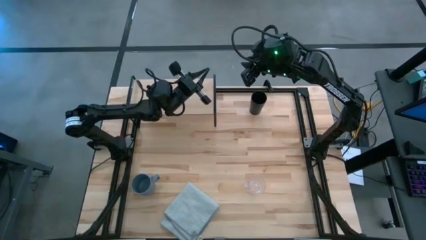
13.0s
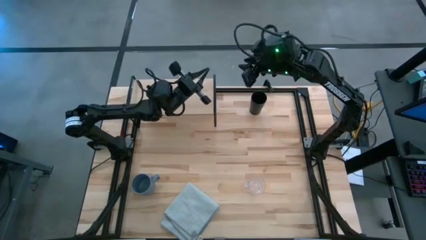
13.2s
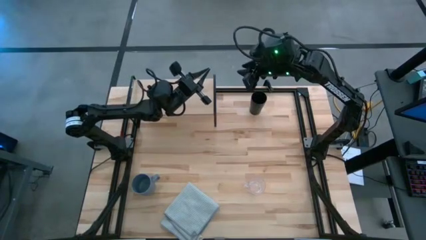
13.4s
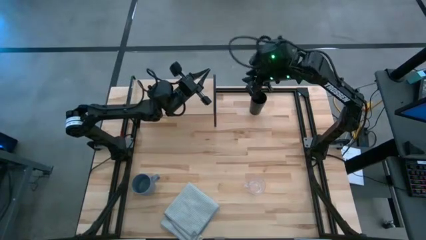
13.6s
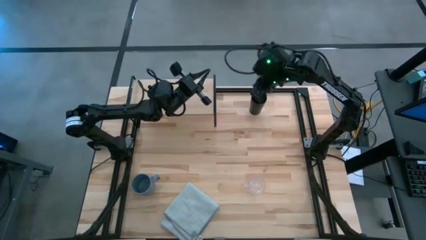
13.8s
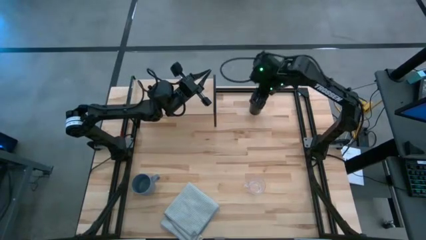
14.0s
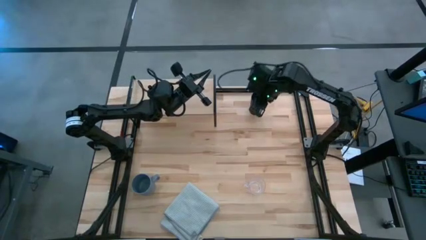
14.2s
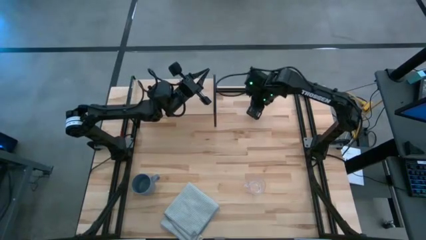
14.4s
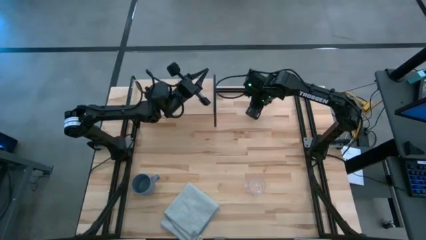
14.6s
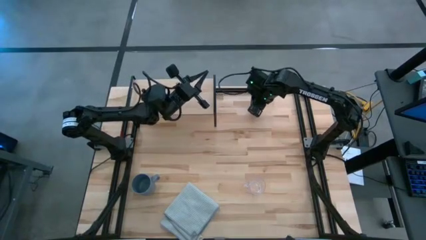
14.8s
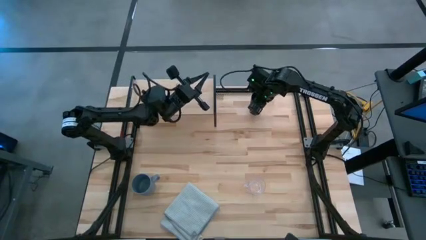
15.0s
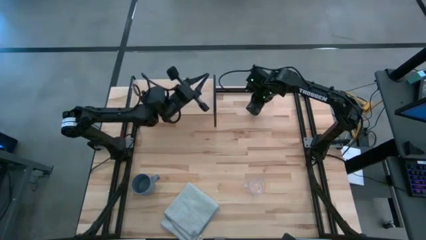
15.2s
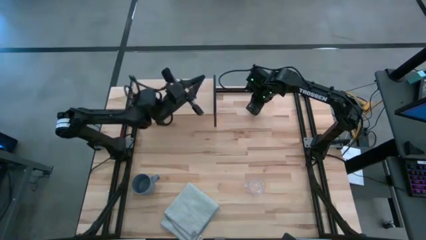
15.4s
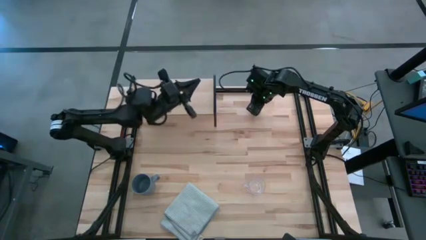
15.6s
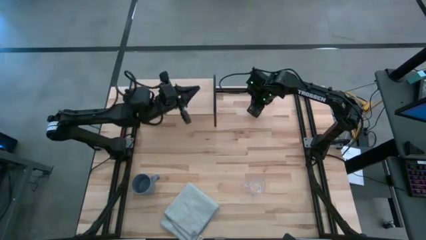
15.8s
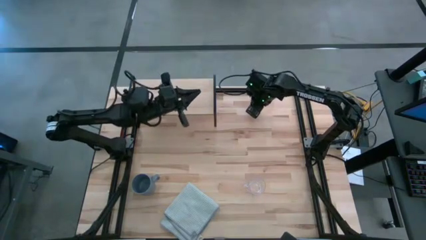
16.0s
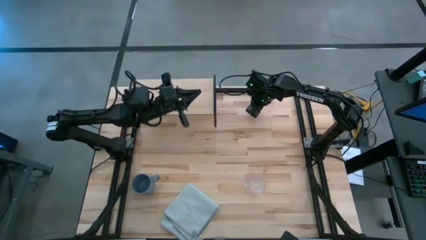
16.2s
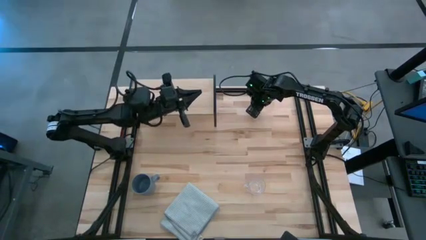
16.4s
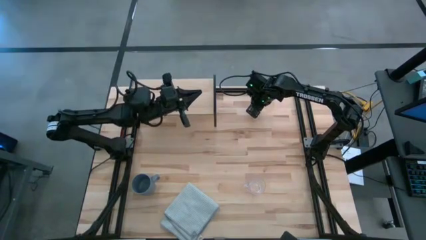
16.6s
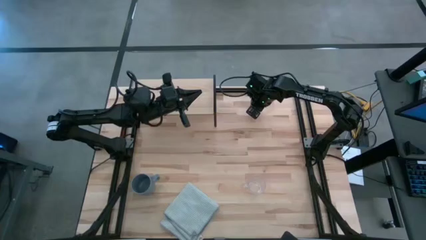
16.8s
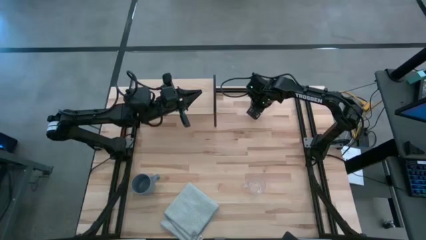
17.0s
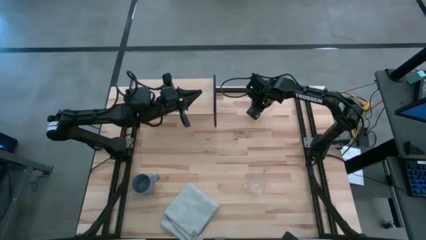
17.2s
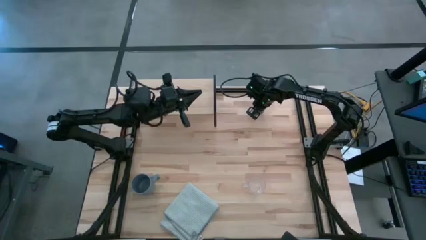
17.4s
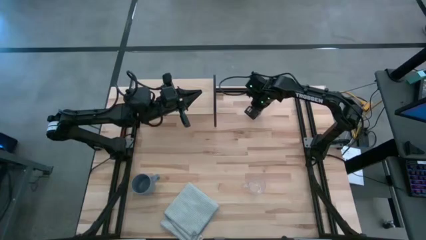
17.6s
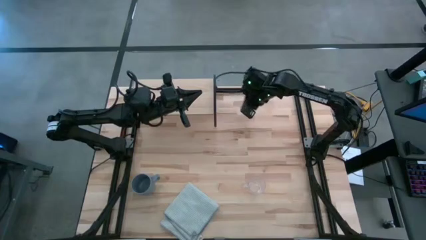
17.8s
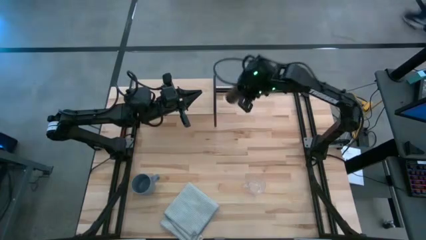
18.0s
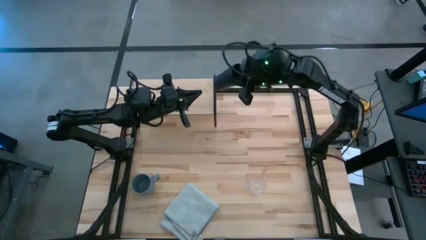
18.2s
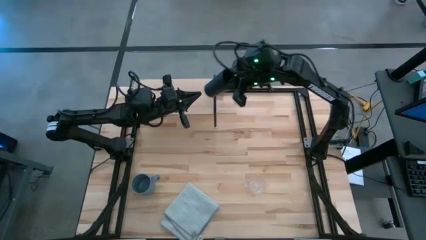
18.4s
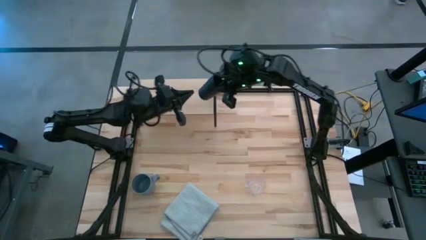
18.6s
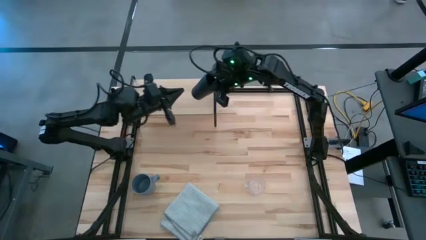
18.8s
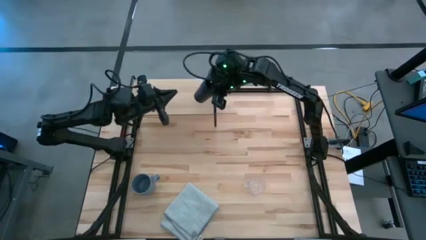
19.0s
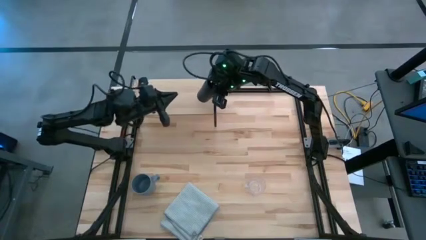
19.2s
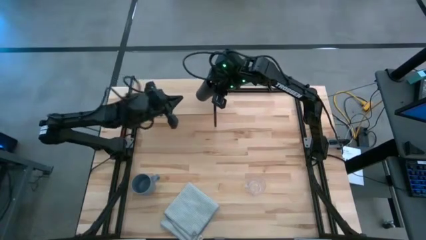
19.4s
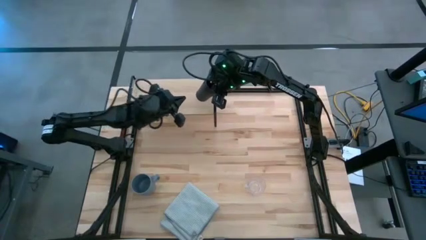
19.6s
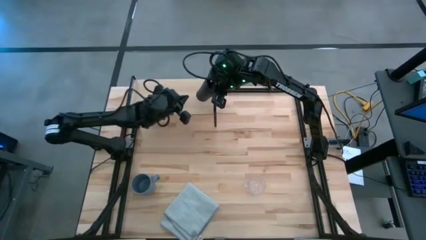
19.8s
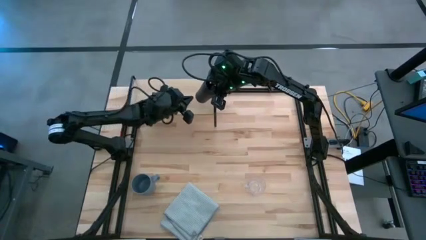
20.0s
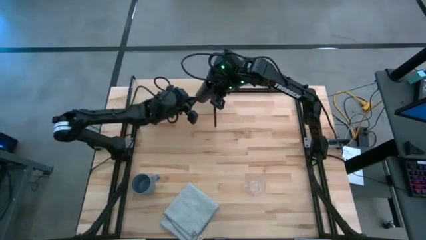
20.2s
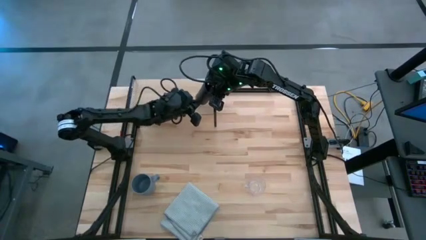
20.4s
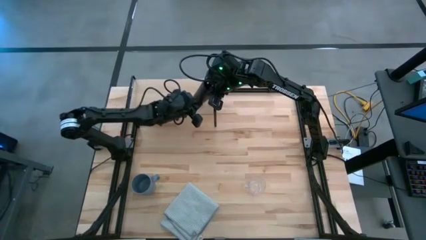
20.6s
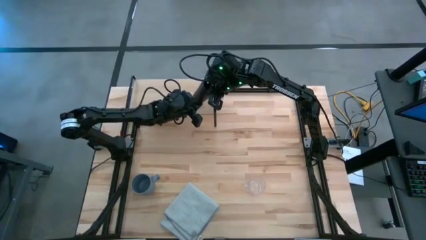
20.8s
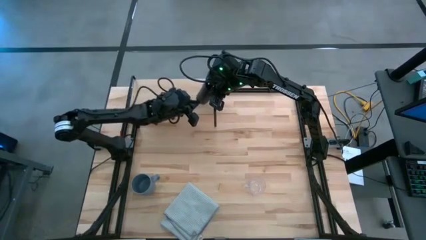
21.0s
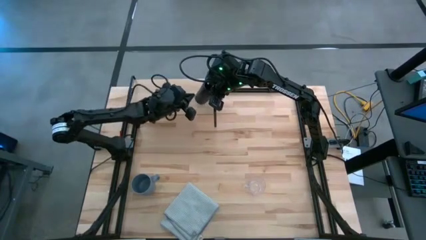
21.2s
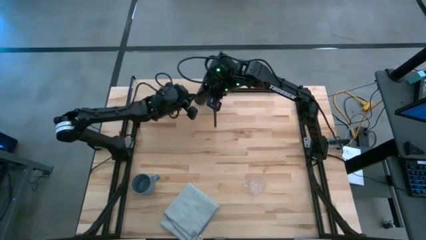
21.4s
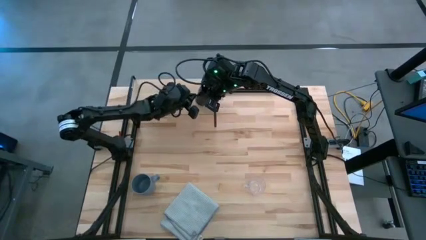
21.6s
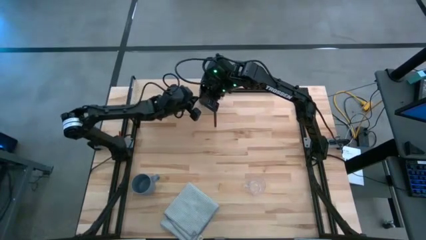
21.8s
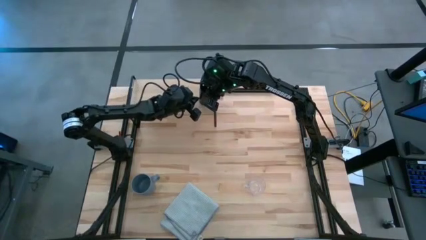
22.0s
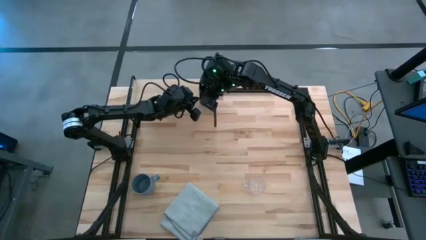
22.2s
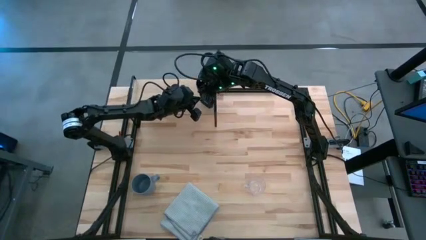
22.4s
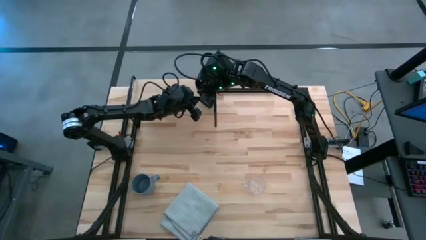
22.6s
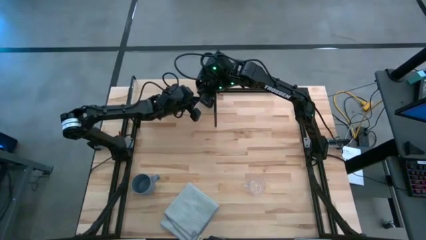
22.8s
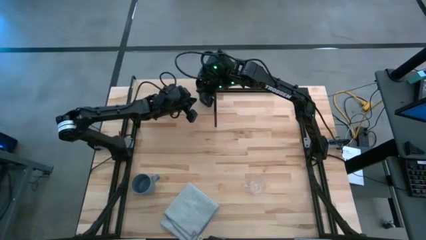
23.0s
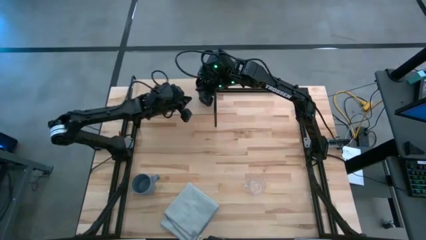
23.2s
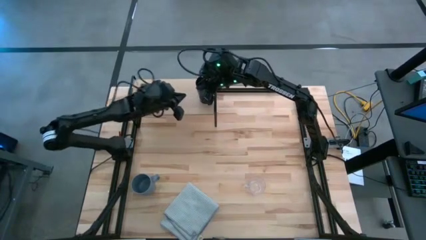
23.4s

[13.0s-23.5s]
Task: Stack small to large cups/mugs on shelf
Put the black cup on the shelf

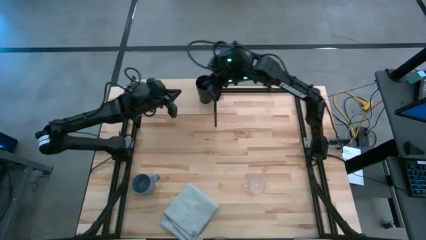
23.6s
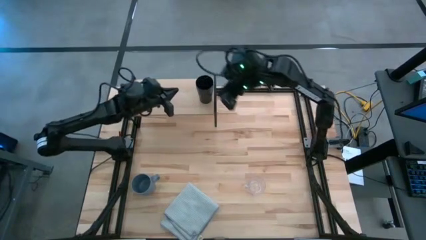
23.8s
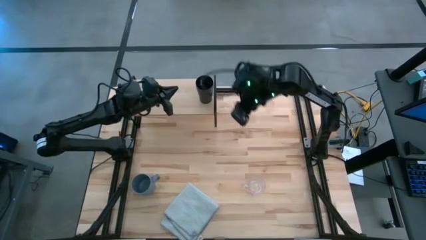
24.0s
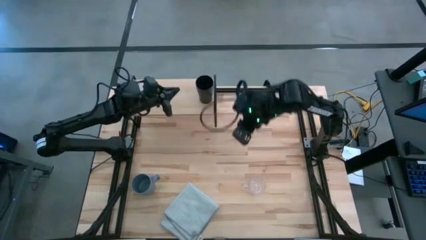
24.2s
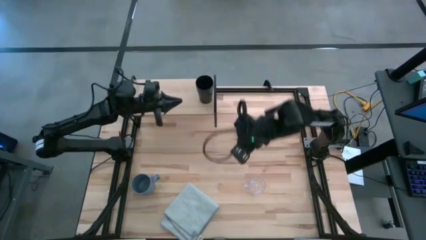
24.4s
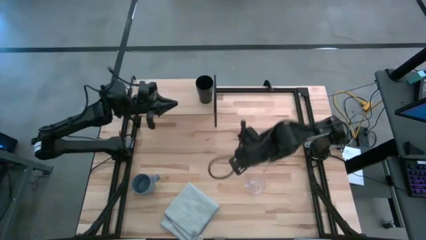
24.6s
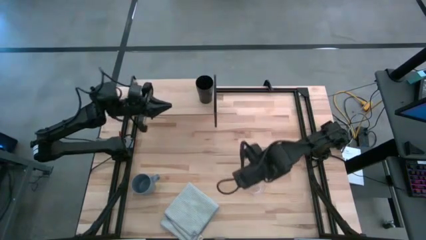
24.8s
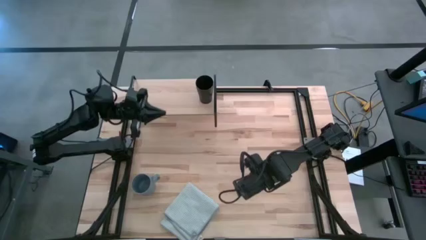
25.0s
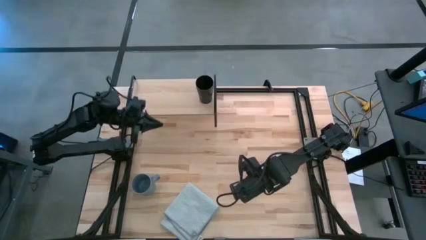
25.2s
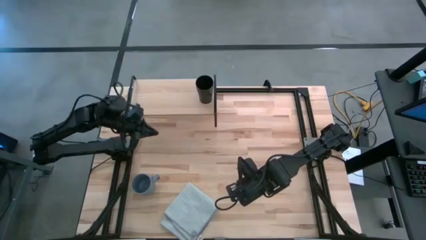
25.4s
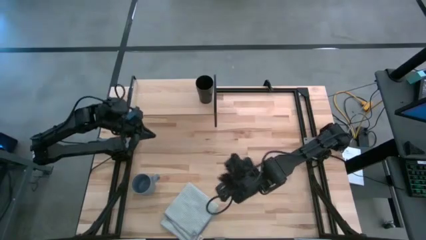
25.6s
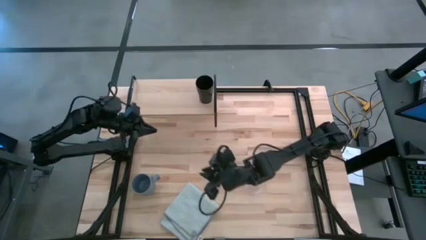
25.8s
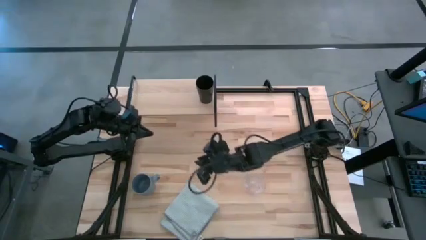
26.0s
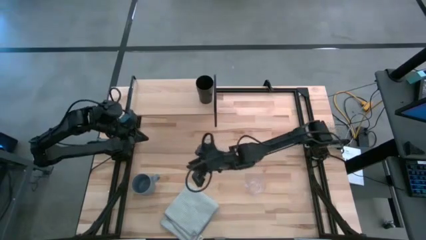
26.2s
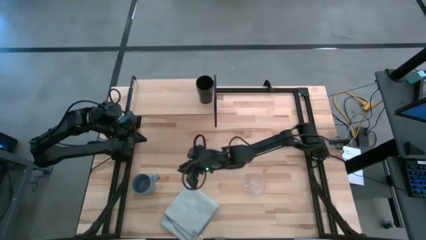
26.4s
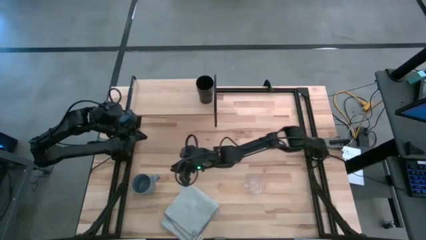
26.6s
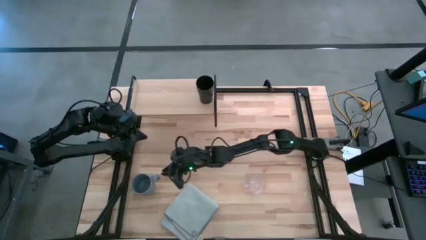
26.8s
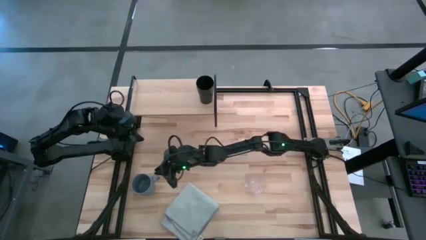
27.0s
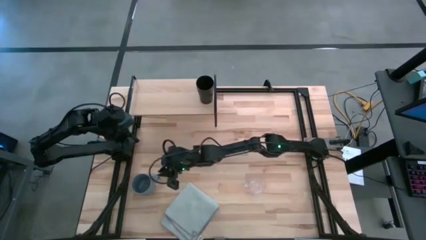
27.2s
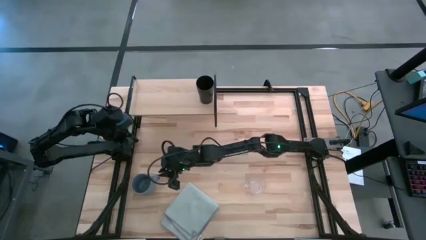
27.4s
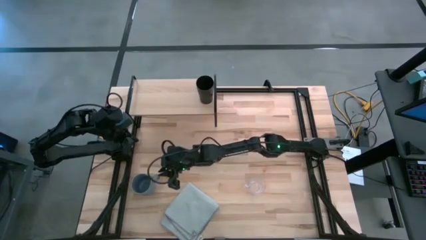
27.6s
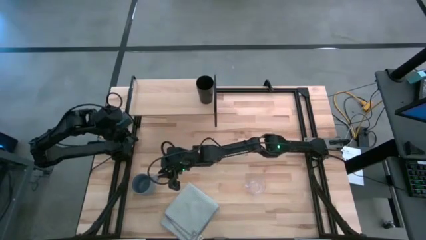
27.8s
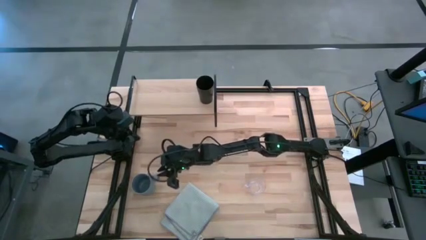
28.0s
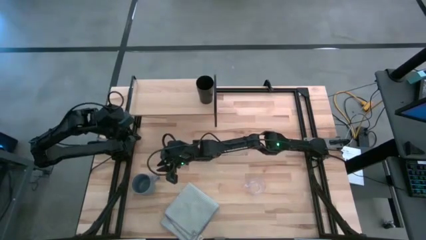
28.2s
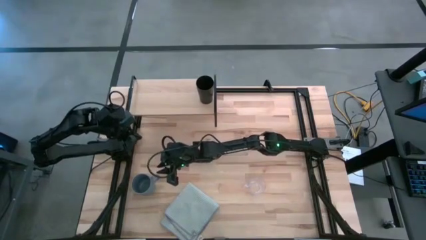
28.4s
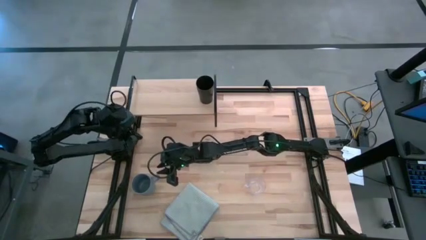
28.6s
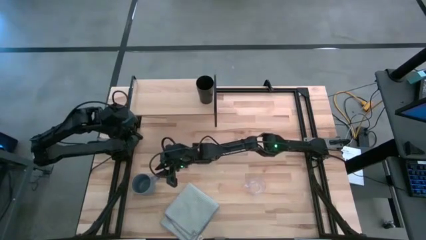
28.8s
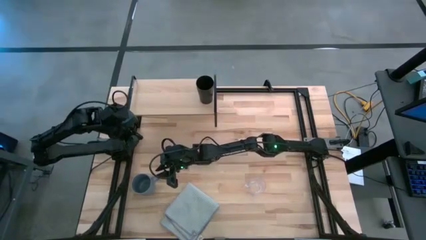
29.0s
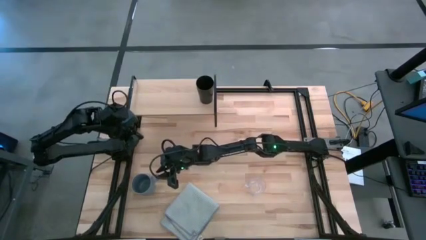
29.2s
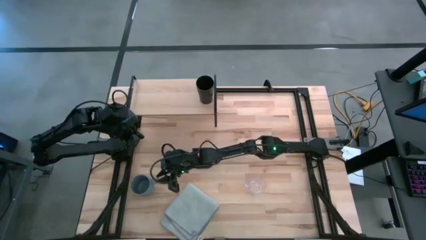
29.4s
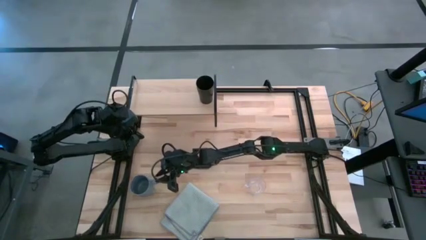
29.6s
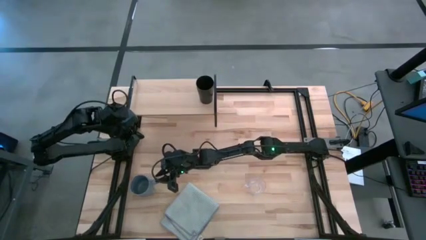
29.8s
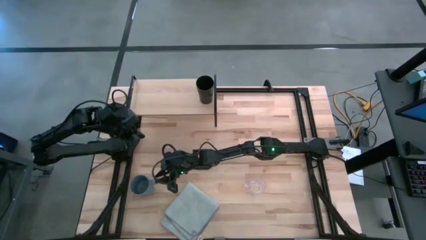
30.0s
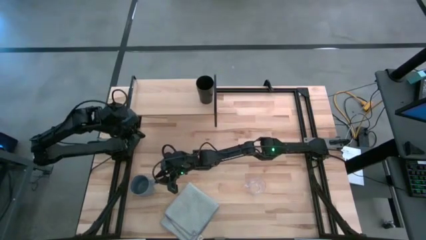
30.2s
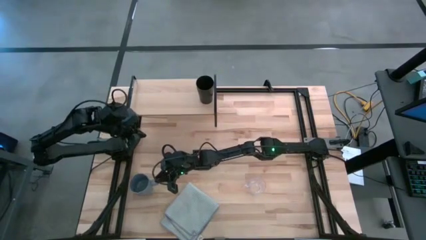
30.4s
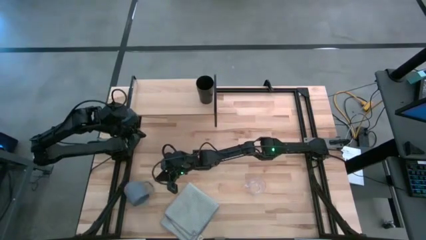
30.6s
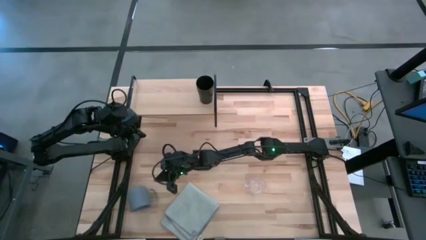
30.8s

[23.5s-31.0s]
Put the blue mug on the shelf
